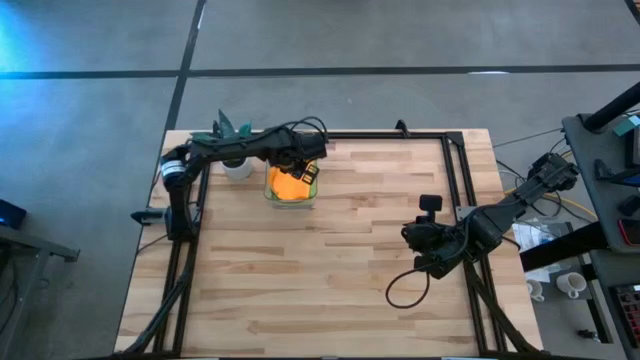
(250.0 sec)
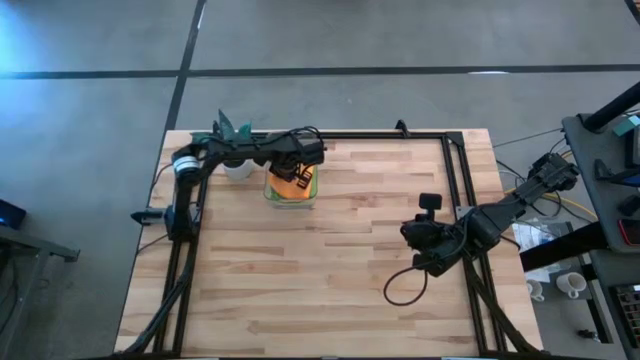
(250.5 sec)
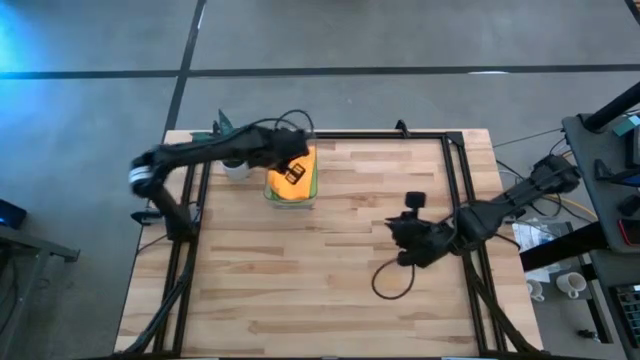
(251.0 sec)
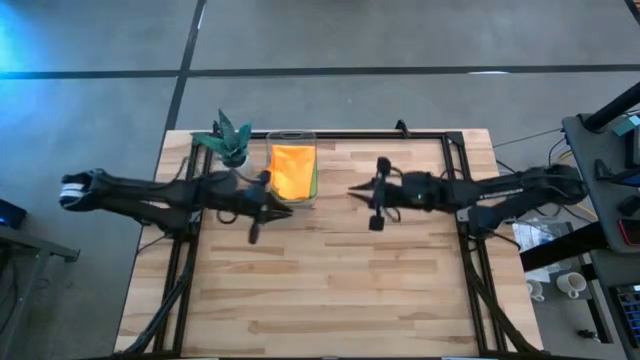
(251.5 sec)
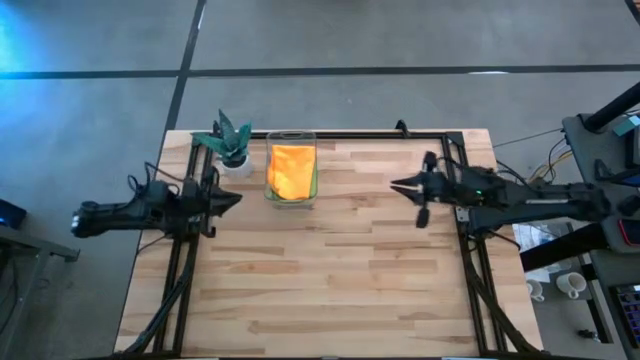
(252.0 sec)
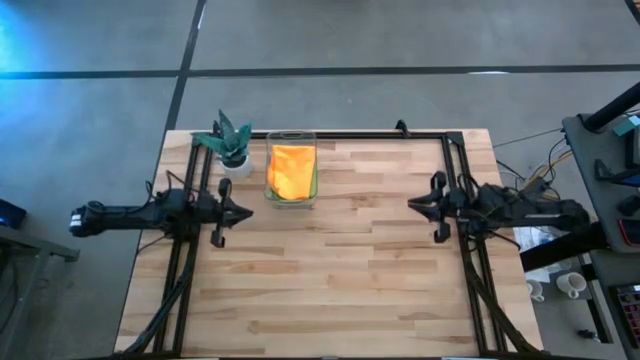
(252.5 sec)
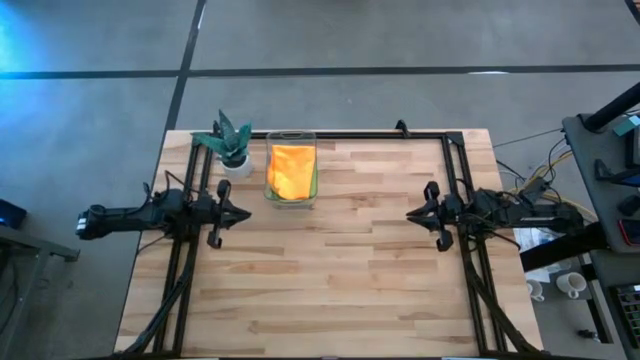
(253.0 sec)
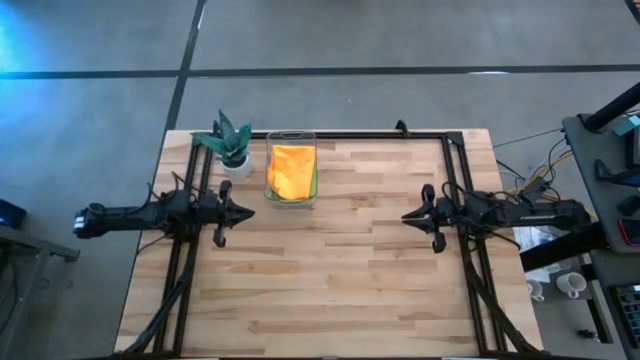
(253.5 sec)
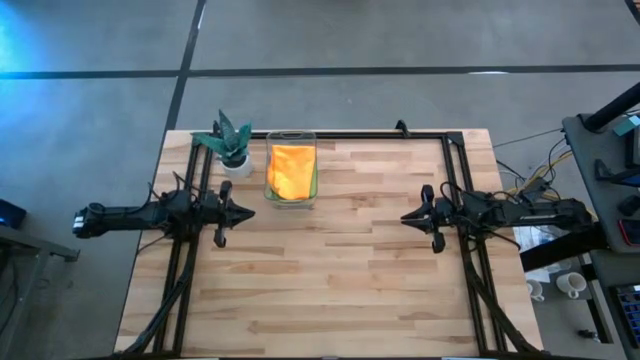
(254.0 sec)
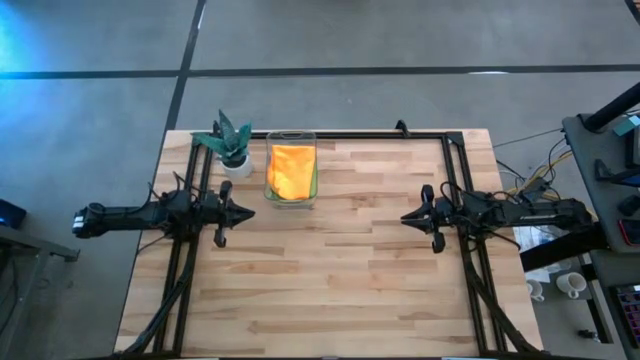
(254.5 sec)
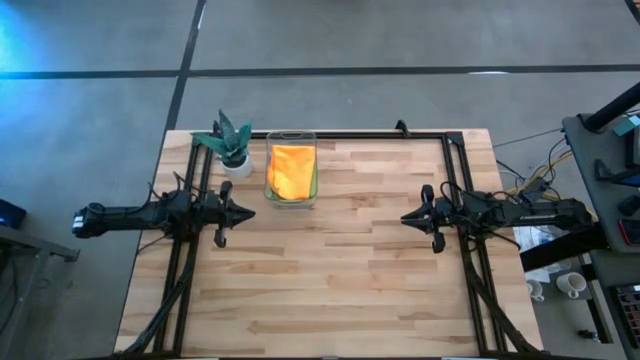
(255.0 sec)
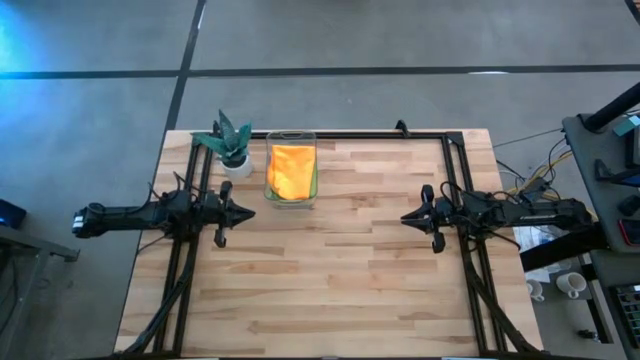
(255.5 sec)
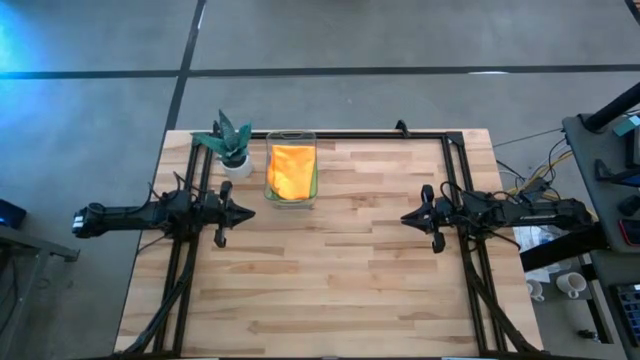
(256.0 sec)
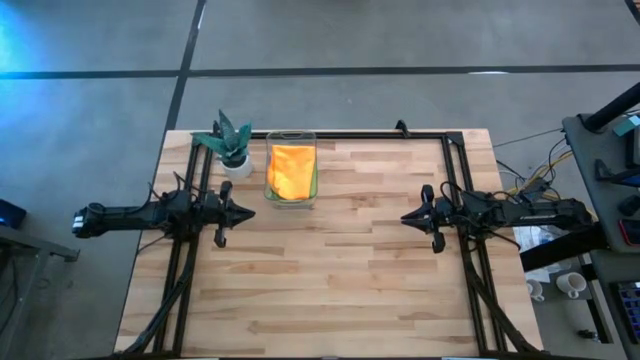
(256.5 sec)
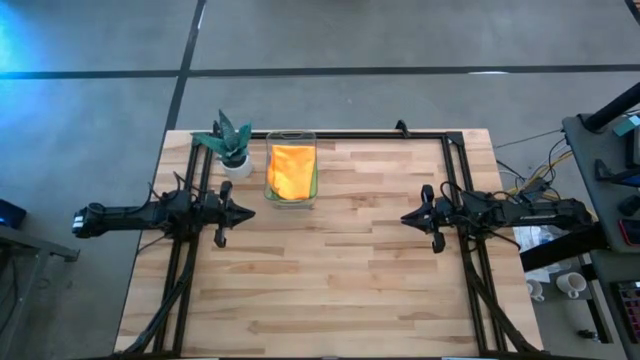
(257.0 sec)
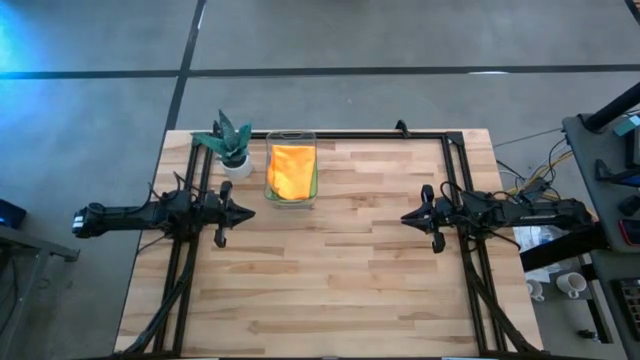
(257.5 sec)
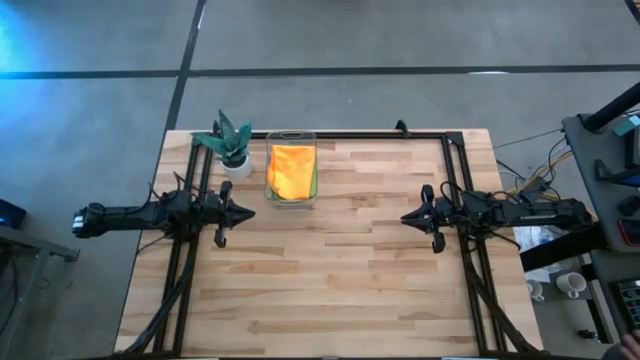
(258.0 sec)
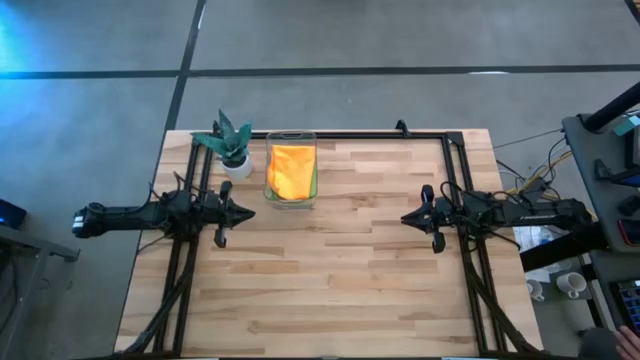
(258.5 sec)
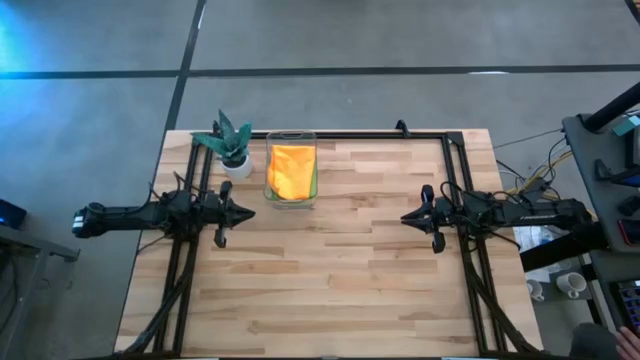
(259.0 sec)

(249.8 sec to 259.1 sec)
Task: Fold microfiber towels
Return to Home Position

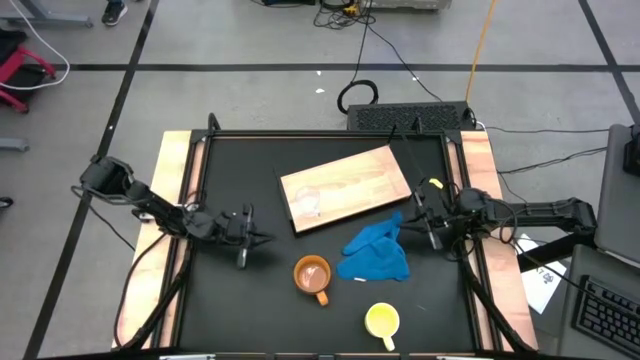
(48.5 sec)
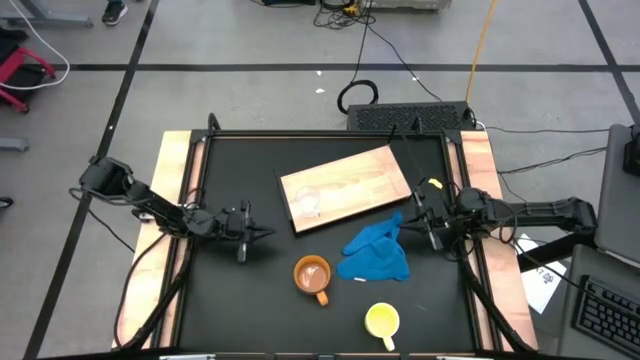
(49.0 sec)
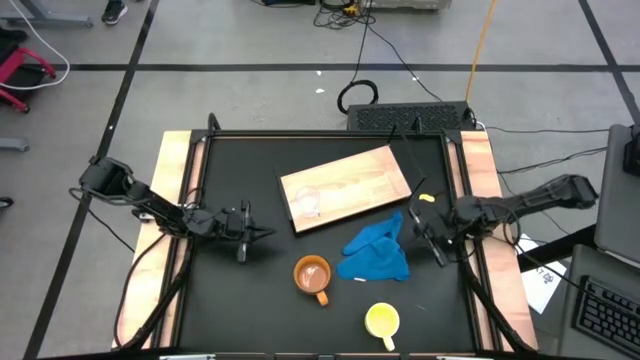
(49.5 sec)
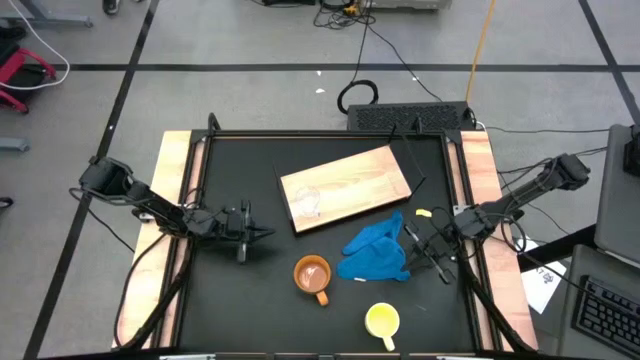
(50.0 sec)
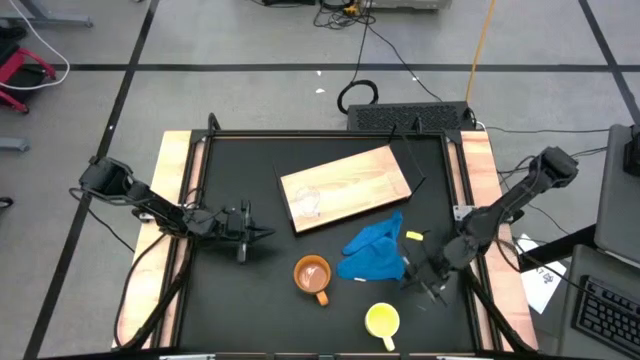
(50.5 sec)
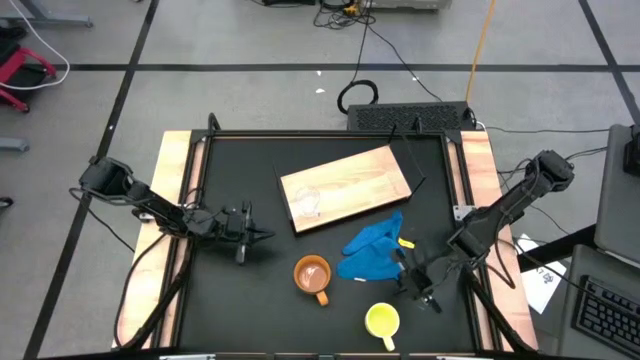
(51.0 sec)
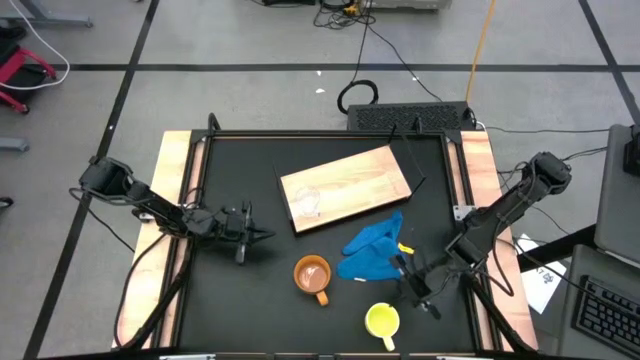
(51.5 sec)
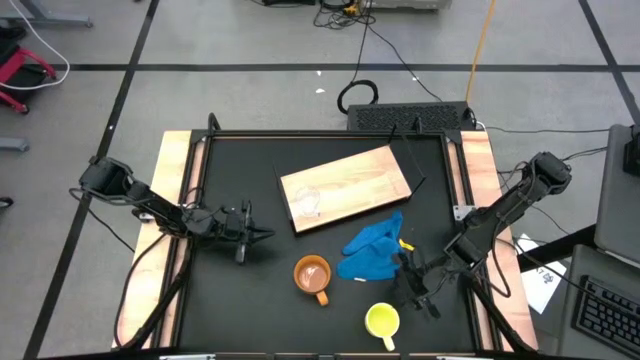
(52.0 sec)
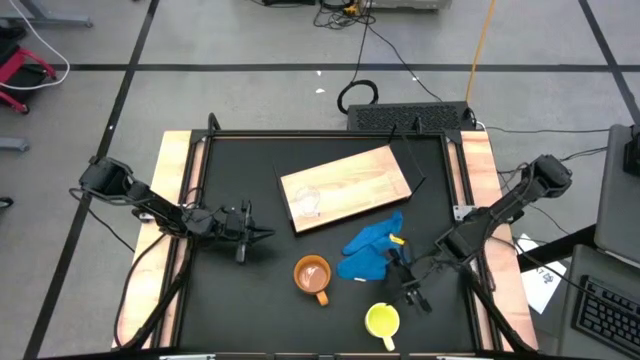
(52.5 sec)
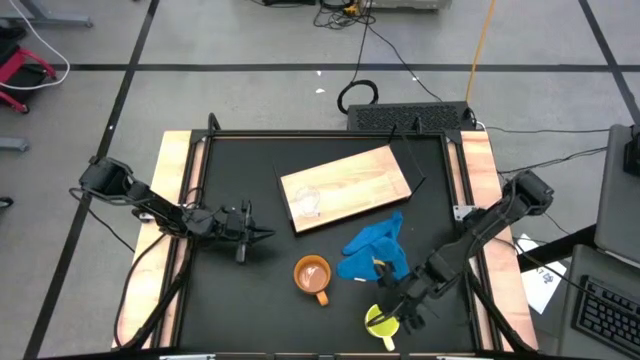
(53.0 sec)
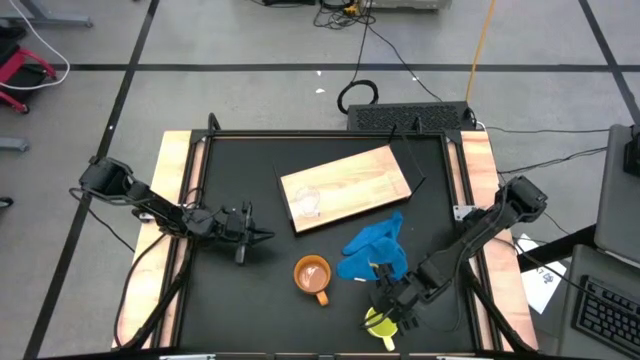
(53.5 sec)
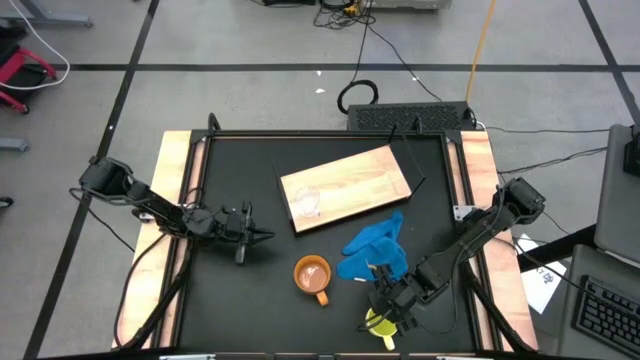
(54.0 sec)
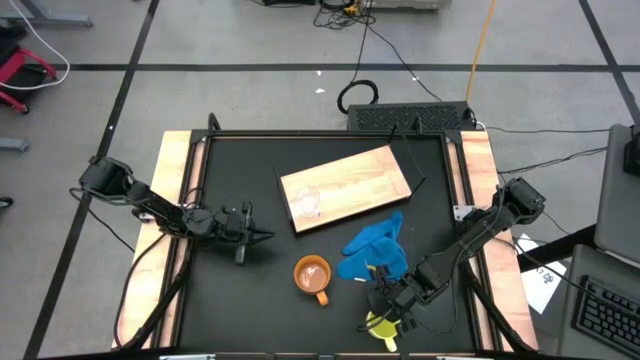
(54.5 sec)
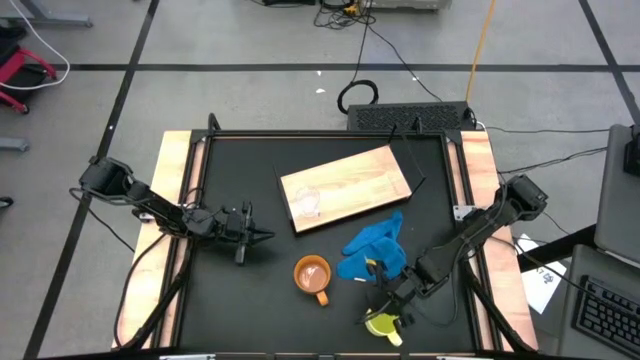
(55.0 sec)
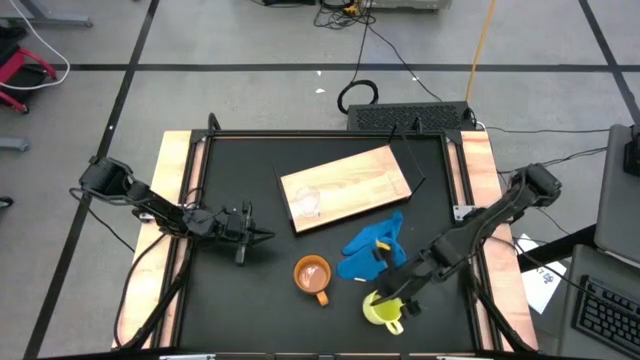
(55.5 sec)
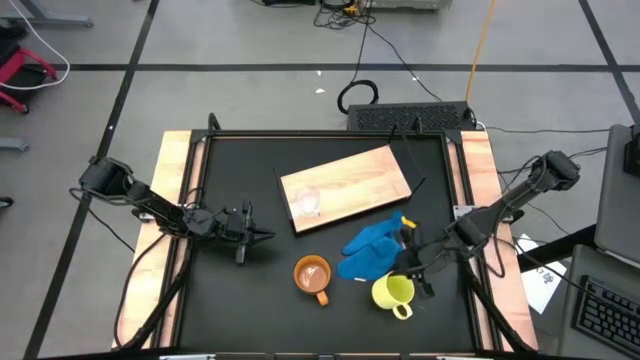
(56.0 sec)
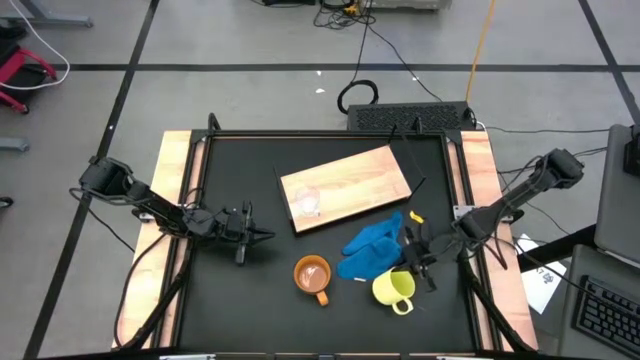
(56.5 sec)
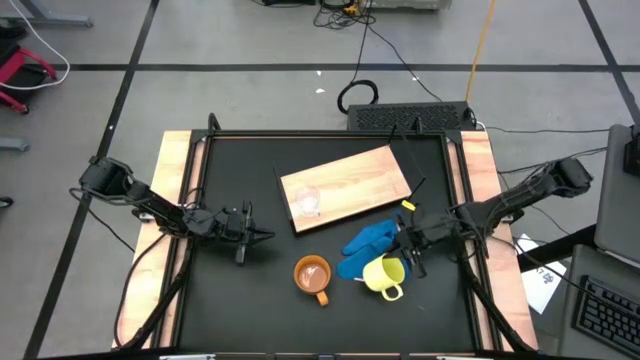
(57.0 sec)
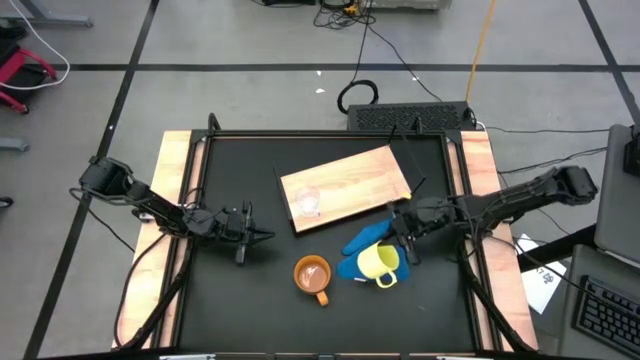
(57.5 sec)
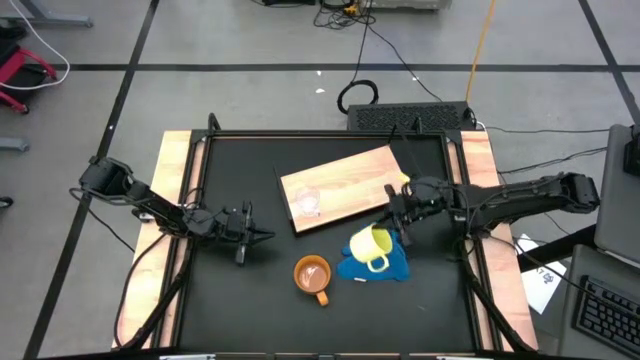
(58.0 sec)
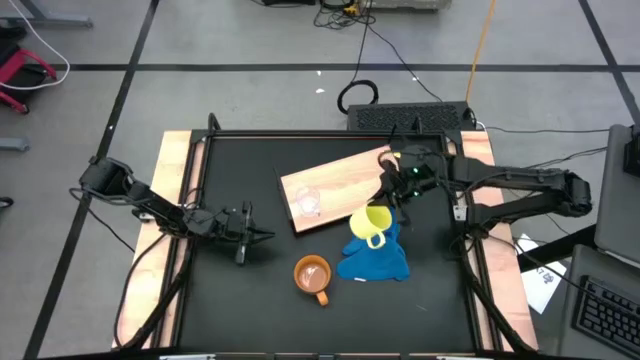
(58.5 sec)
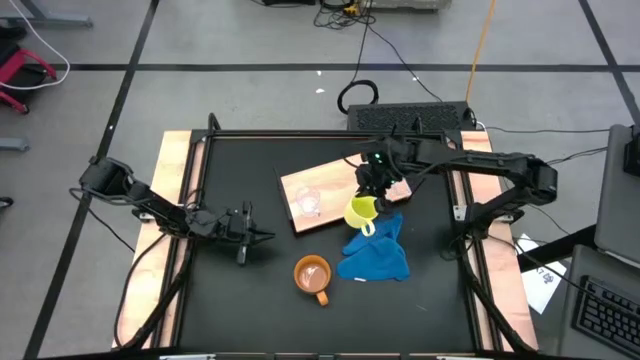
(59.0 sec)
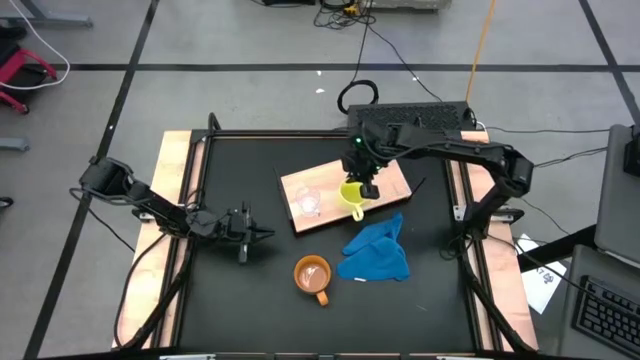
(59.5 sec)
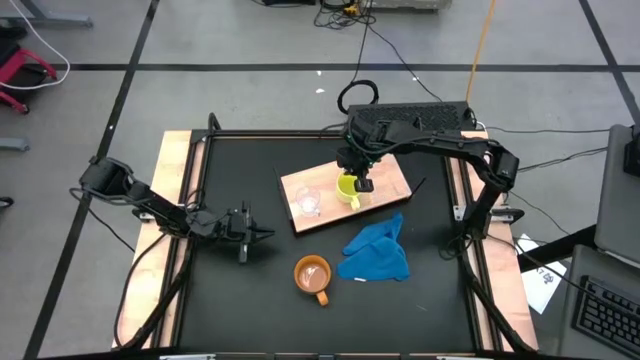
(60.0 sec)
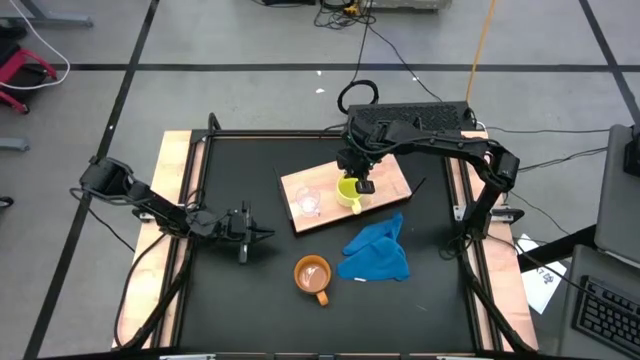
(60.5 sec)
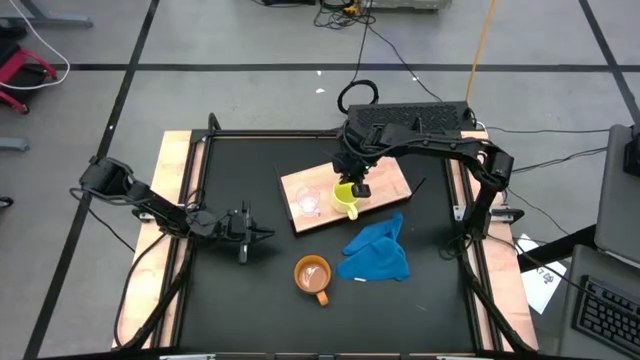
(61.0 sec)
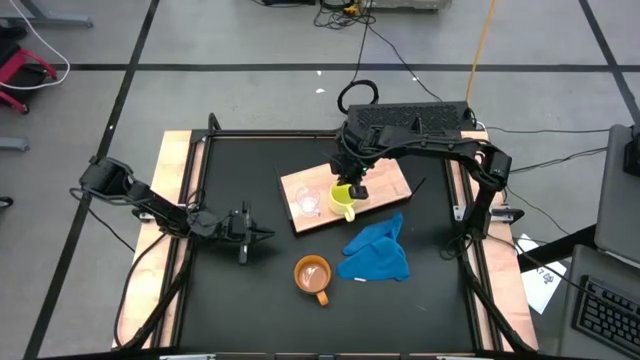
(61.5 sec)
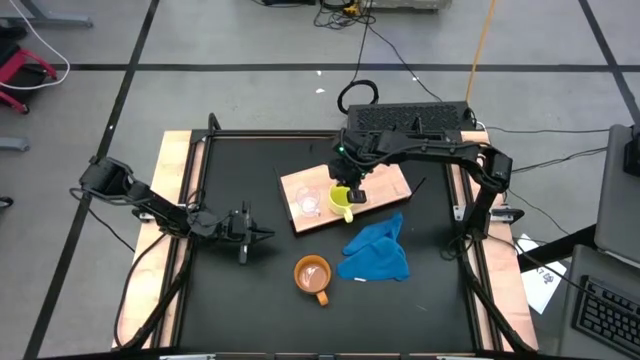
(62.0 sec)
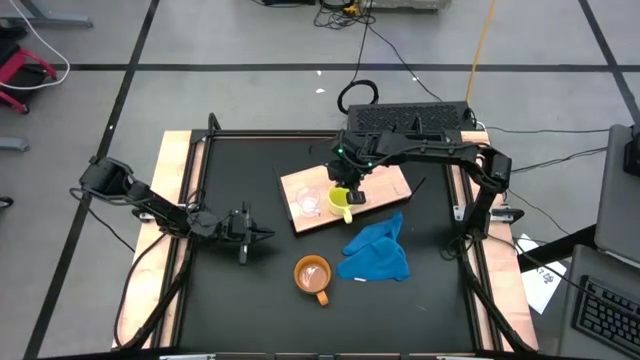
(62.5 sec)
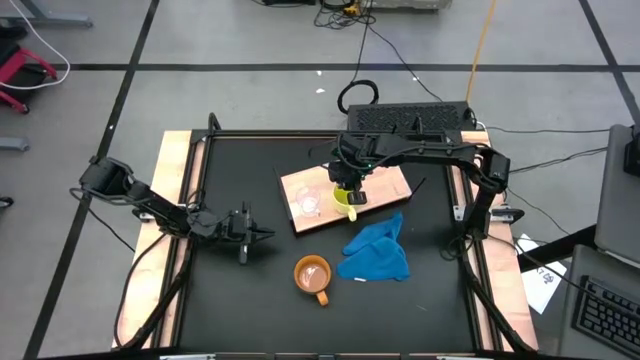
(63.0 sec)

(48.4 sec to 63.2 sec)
Task: Stack small to large cups/mugs on shelf
Put the yellow mug on the shelf
